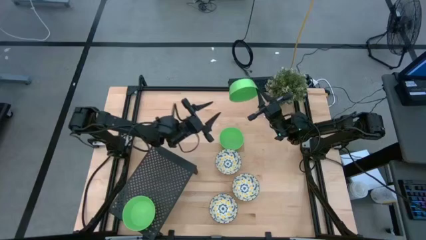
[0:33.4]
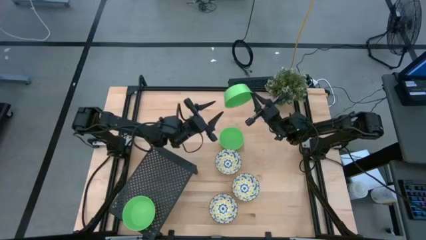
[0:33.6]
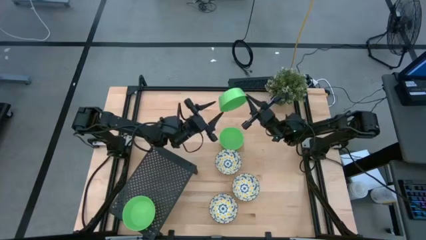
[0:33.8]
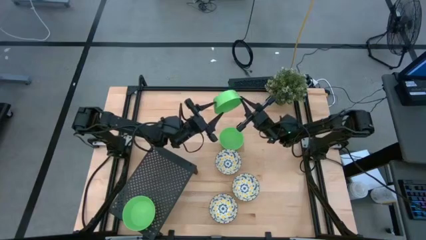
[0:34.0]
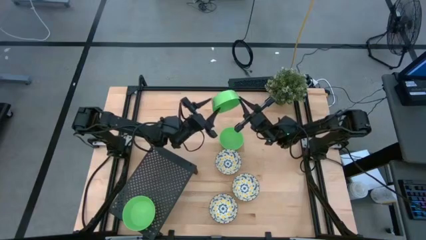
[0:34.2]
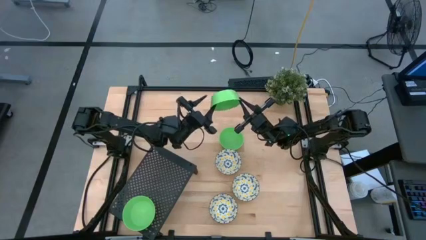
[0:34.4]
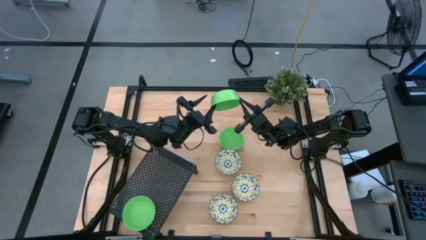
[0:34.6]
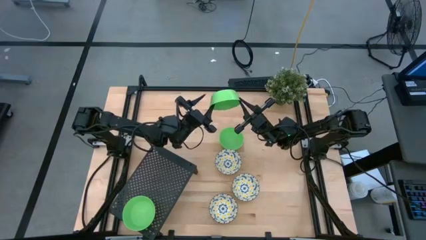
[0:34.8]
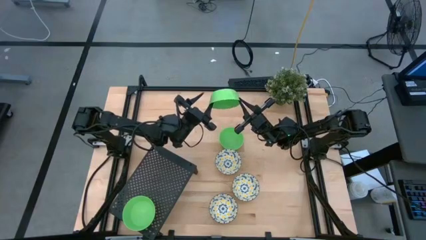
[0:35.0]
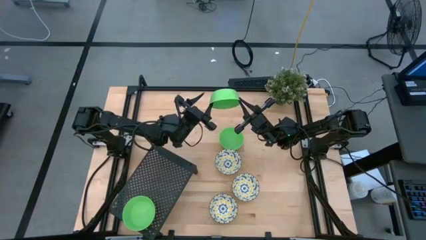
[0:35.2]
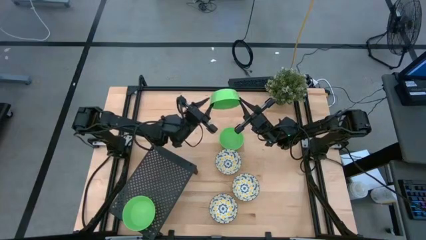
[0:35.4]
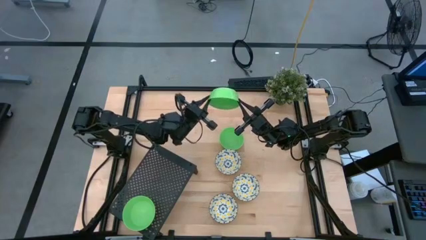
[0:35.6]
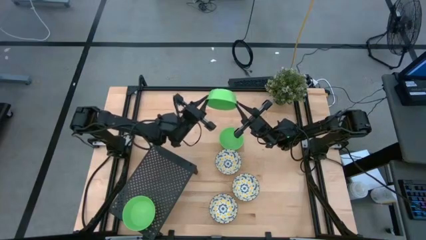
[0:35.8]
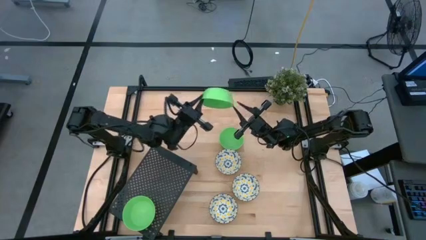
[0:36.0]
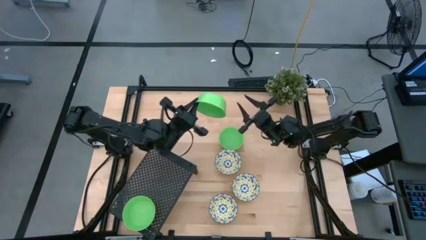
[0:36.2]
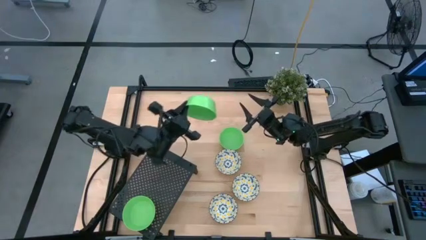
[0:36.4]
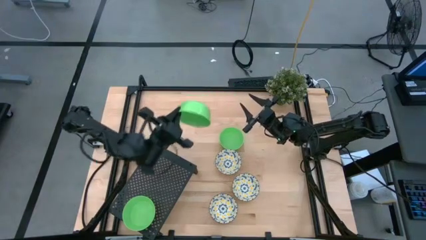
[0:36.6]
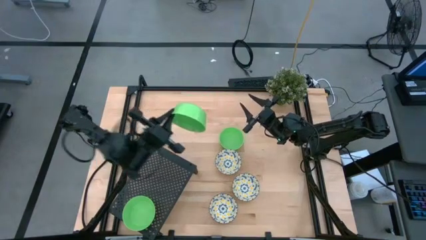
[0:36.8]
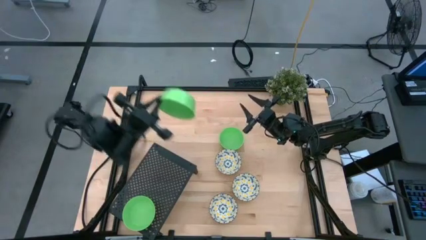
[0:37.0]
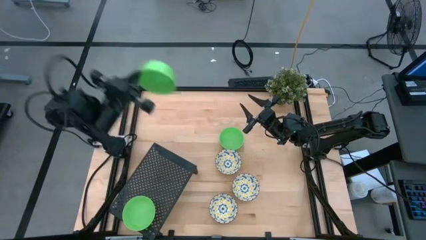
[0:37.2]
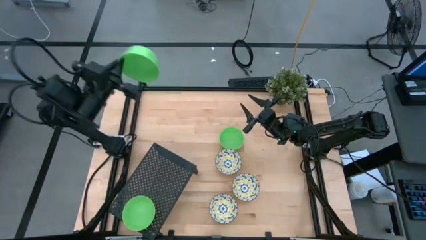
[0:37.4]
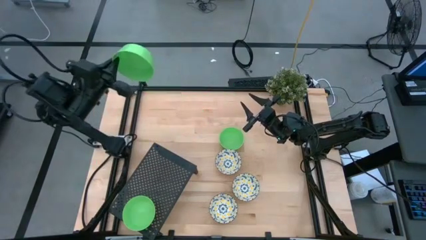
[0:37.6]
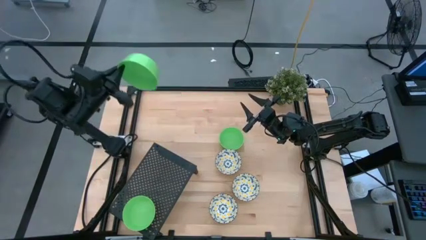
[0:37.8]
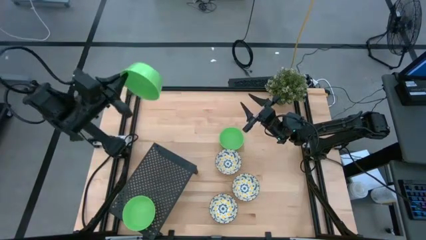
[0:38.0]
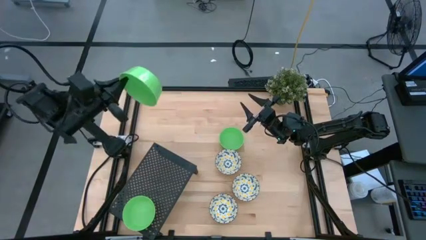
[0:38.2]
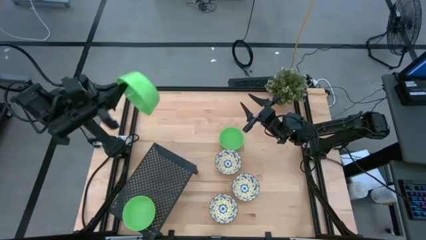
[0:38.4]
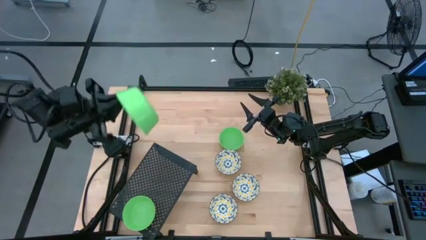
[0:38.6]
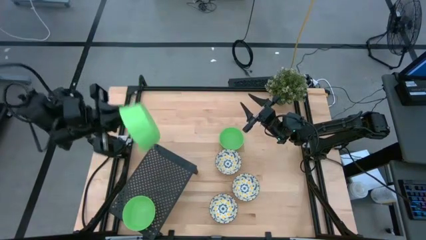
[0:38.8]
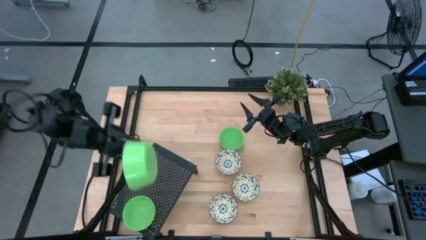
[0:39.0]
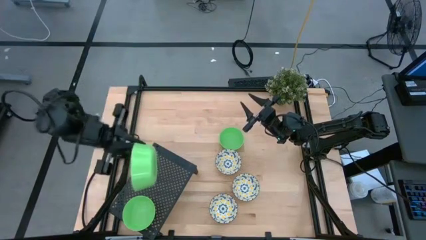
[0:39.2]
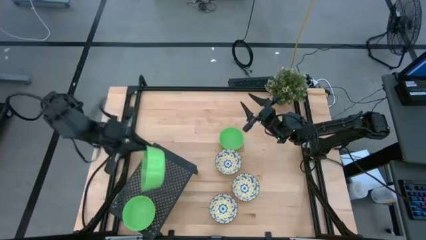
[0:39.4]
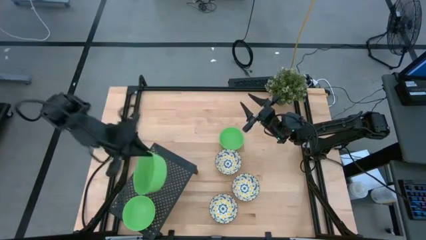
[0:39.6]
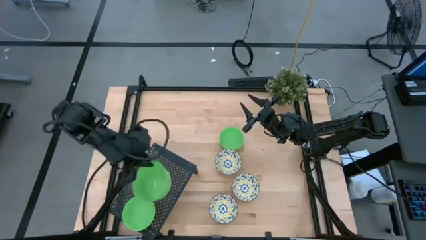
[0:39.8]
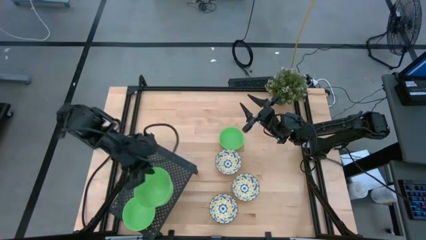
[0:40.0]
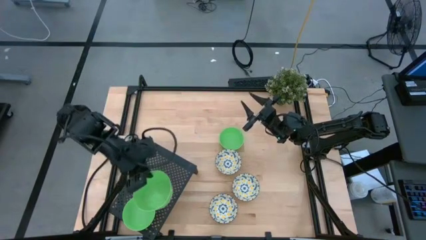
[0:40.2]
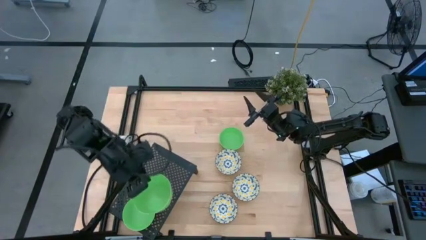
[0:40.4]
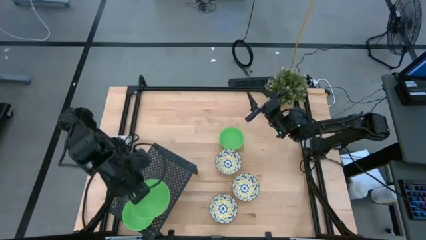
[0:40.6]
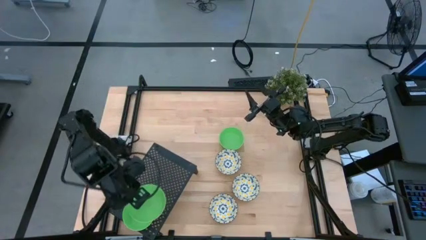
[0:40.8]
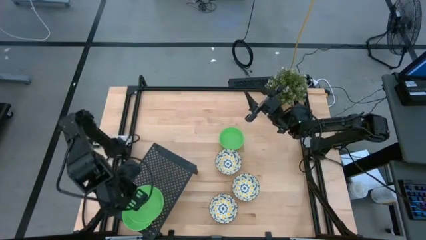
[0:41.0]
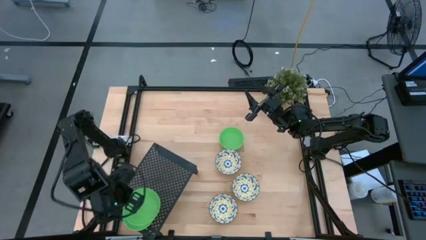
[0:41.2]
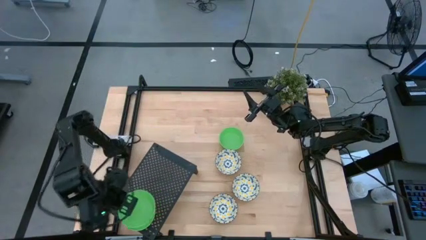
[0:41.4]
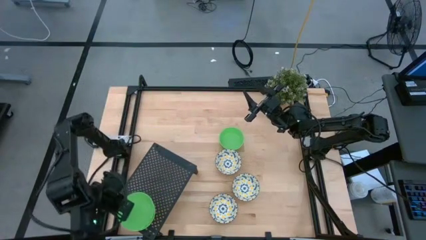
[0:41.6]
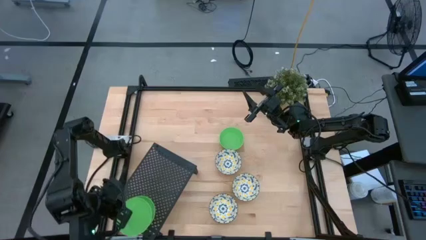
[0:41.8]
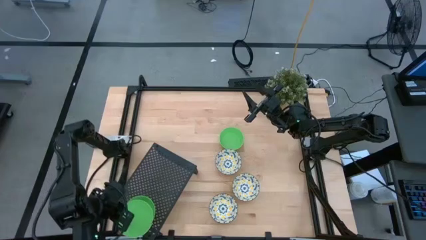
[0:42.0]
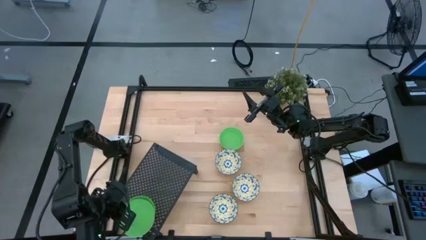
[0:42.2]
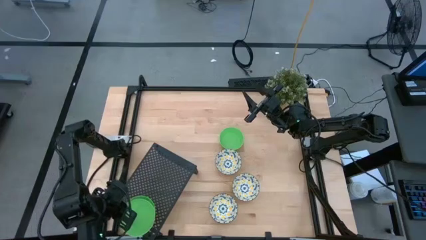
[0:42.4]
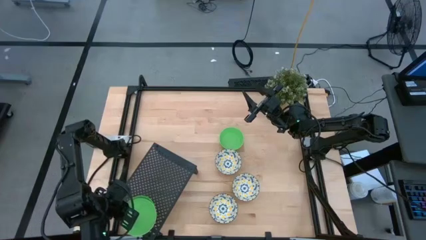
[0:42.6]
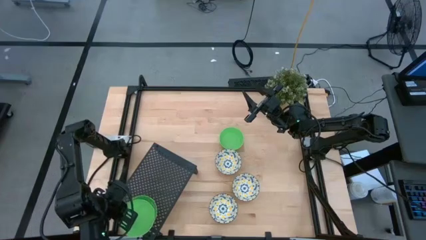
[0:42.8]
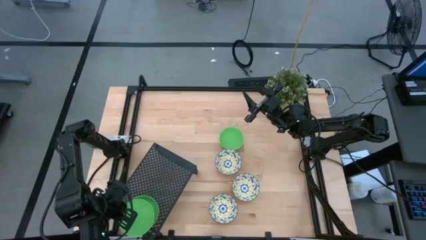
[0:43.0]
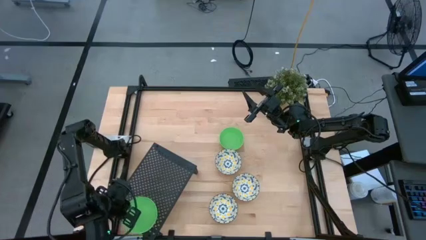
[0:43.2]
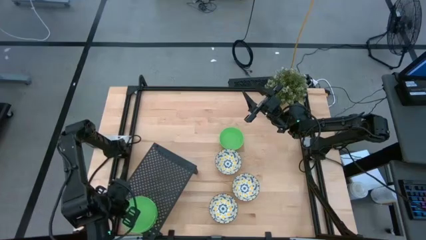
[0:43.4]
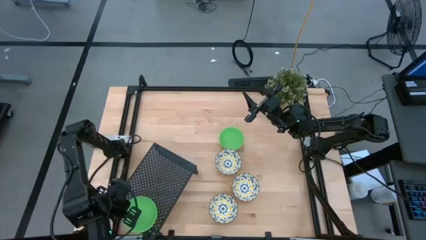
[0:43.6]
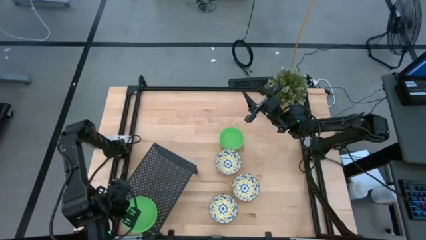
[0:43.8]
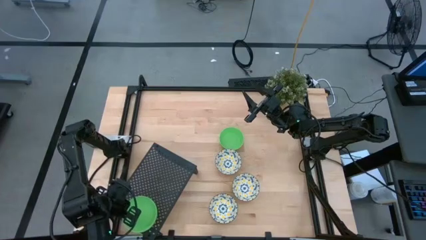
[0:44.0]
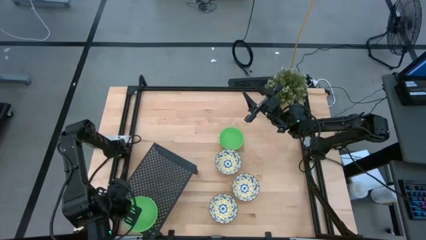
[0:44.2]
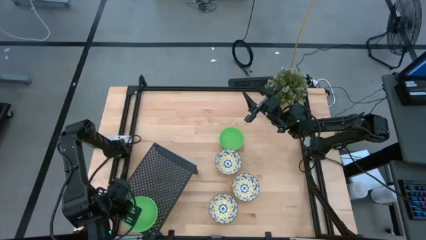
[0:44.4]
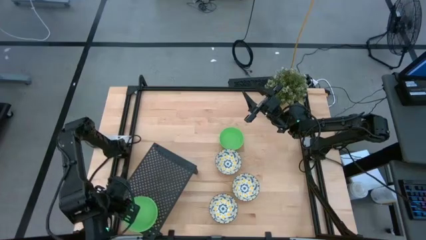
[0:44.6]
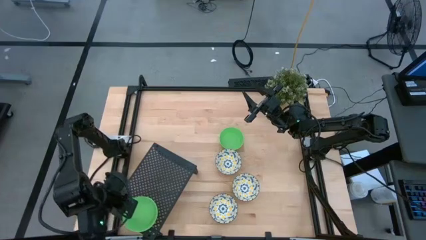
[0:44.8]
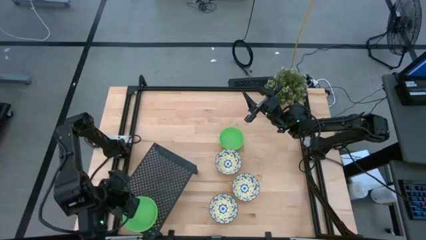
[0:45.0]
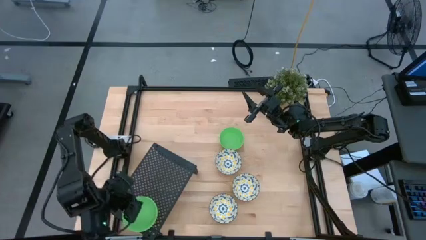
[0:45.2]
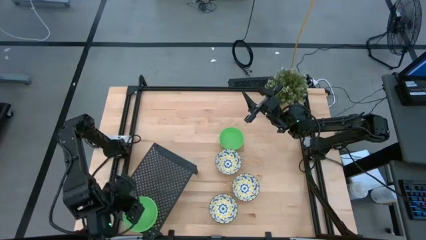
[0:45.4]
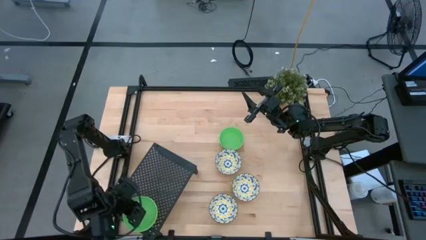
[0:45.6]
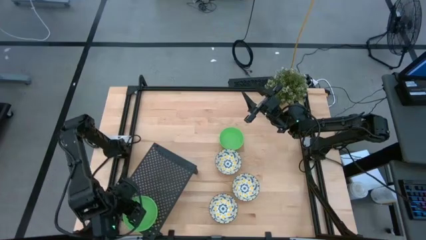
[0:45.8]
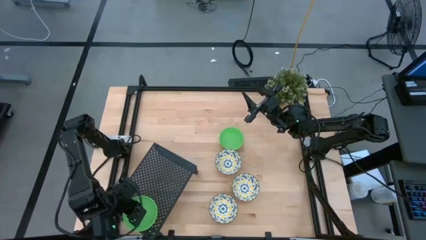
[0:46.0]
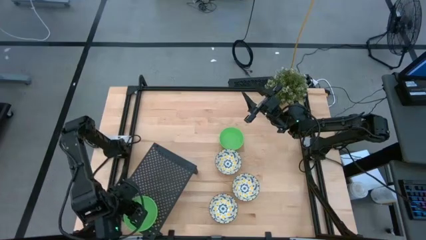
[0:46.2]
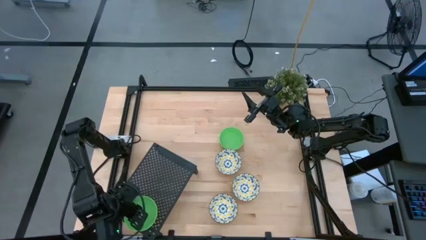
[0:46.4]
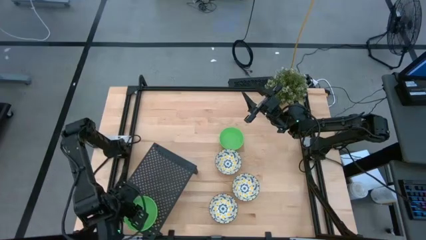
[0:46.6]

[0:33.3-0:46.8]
Task: Pick & Place Mini bowls
Stack the bottom green bowl on the green bowl on the shelf
